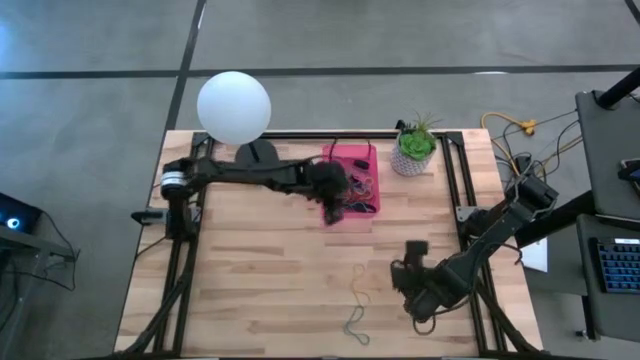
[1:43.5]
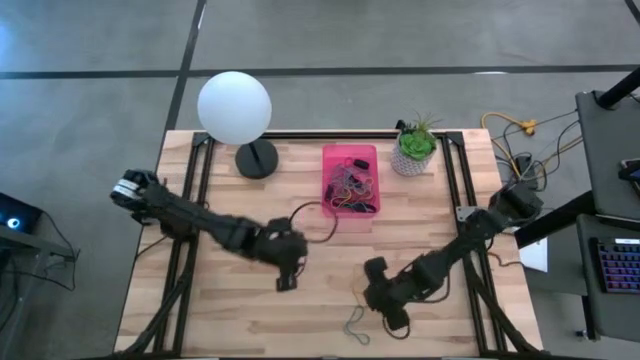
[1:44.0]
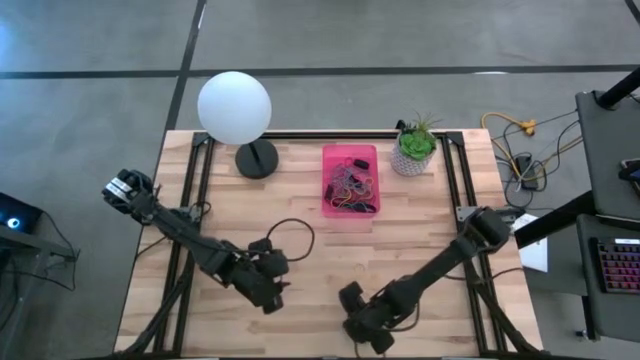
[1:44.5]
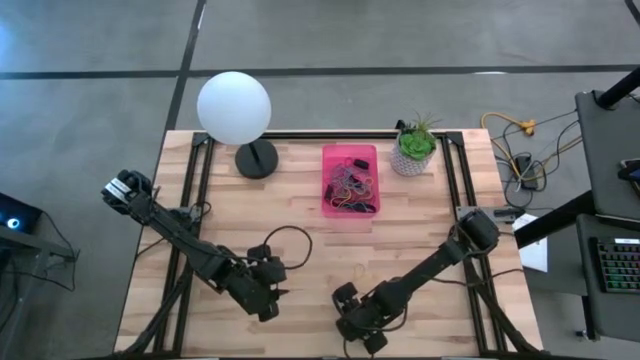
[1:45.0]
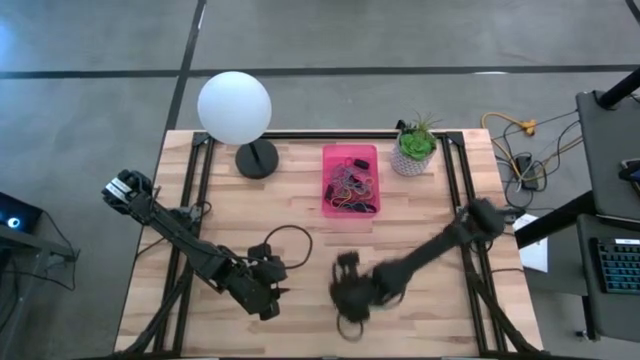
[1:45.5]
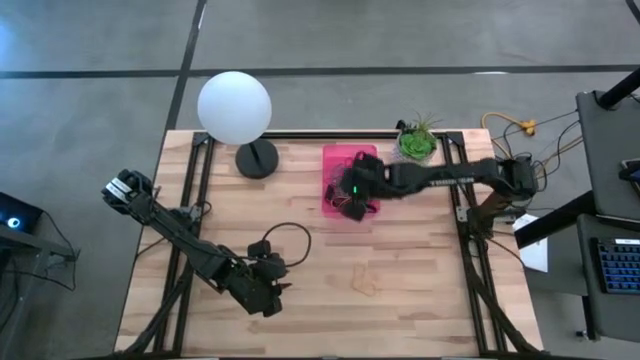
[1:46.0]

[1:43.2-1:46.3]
Task: Pick and place rubber bands into bin
Put the blue rubber band into the pink bin

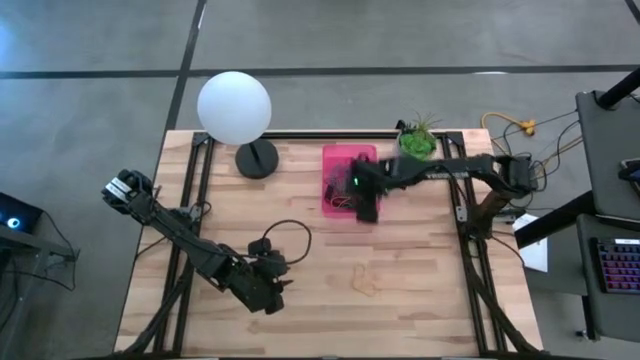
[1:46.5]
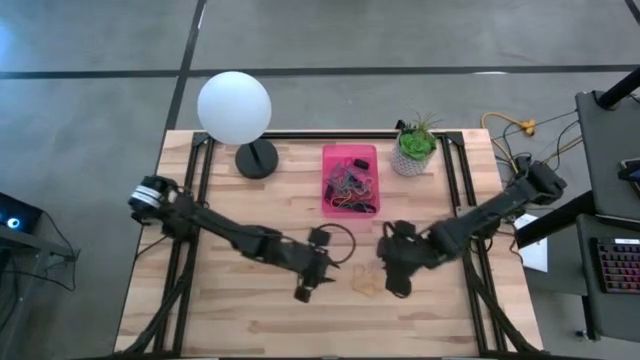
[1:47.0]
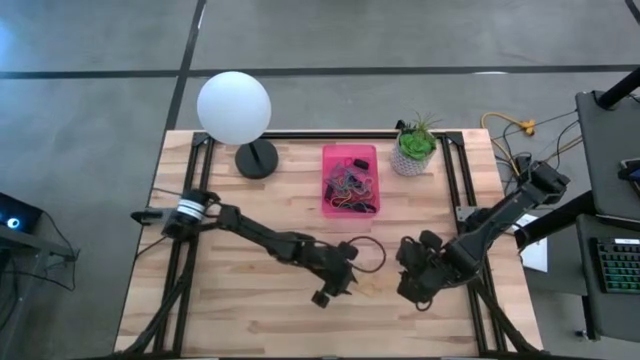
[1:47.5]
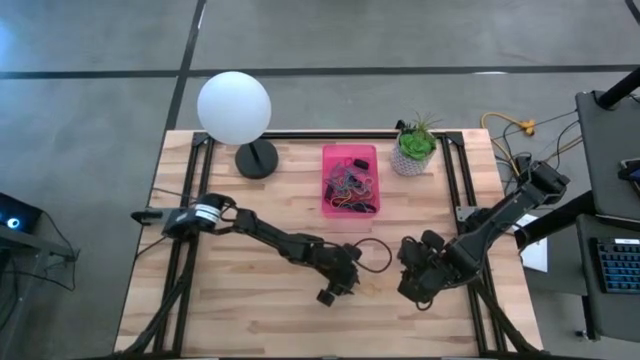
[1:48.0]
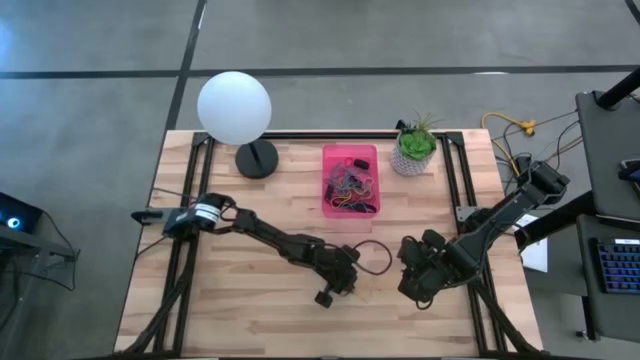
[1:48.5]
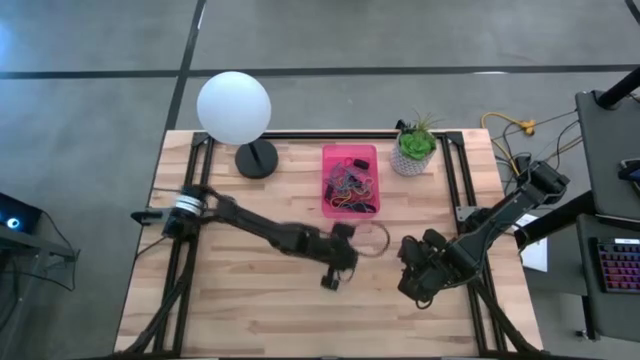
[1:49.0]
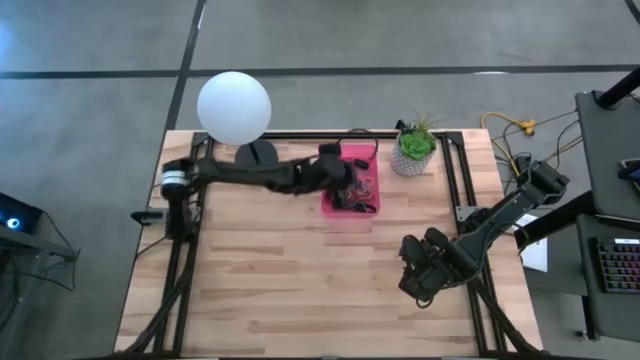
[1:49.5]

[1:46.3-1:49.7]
Put the yellow rubber band into the pink bin

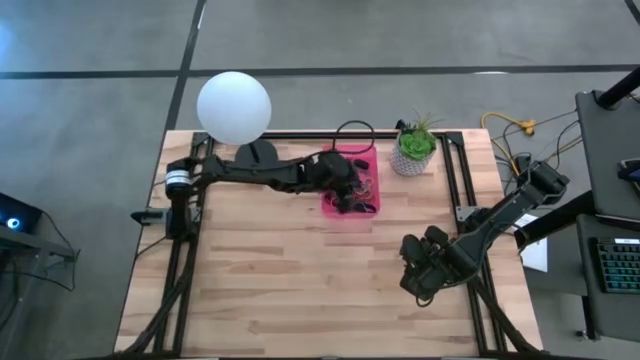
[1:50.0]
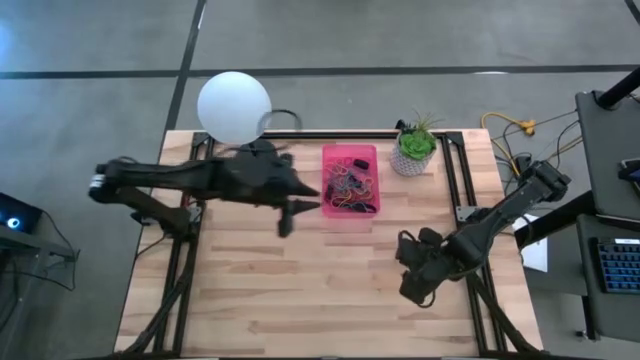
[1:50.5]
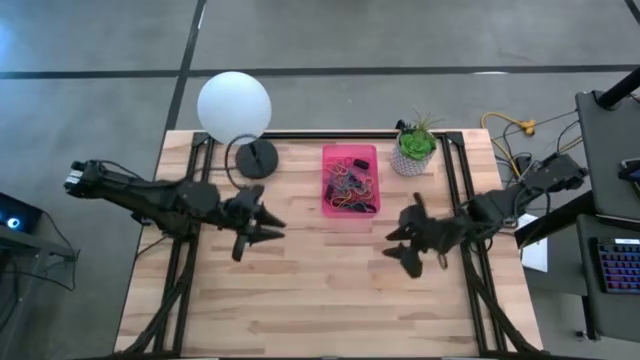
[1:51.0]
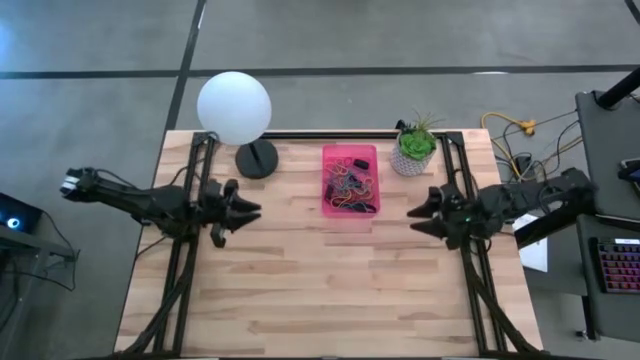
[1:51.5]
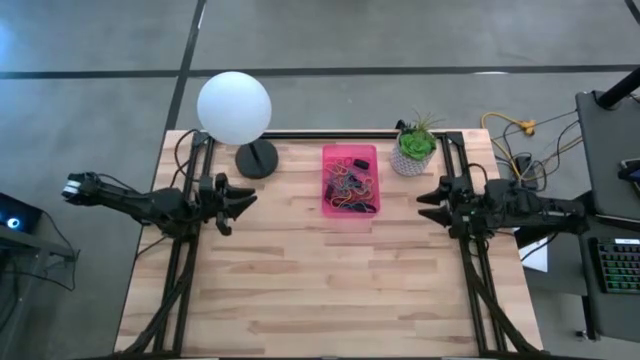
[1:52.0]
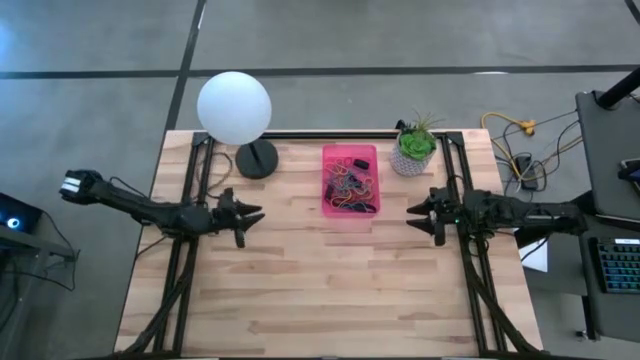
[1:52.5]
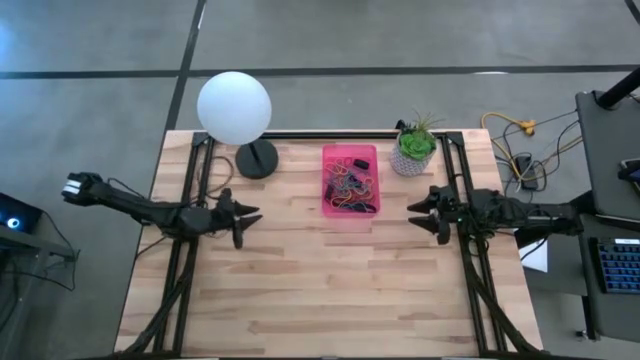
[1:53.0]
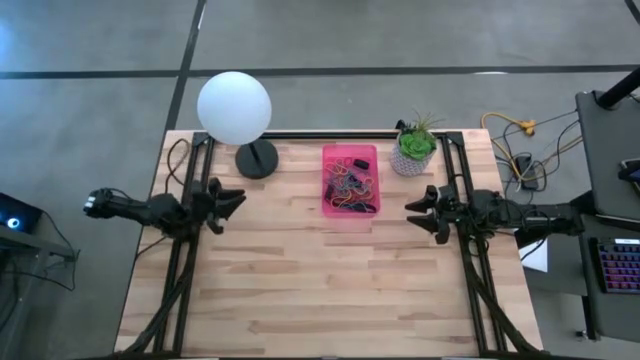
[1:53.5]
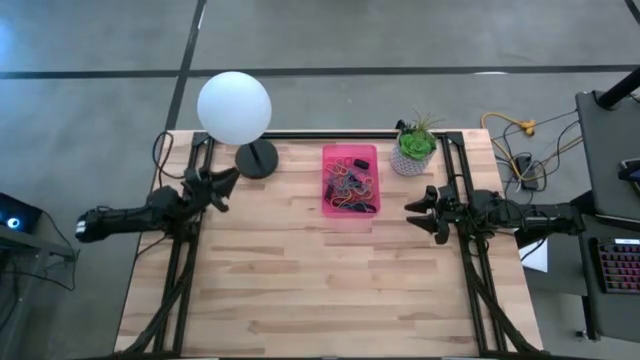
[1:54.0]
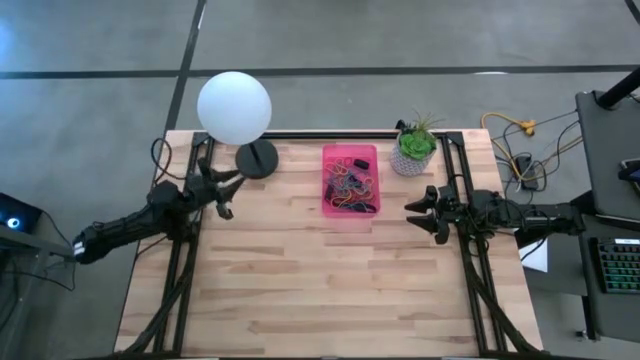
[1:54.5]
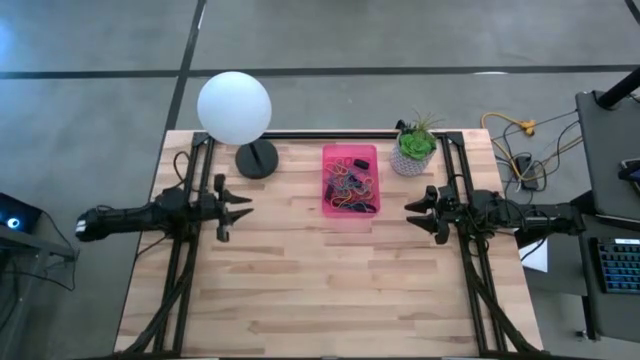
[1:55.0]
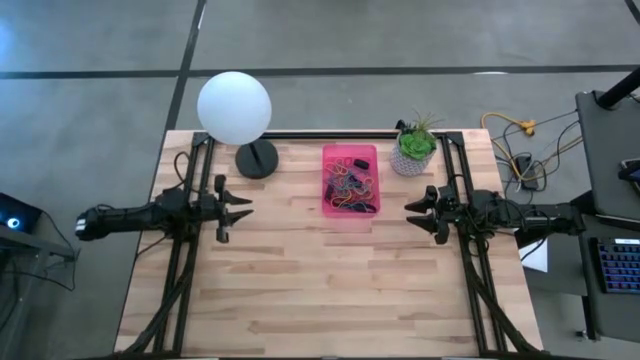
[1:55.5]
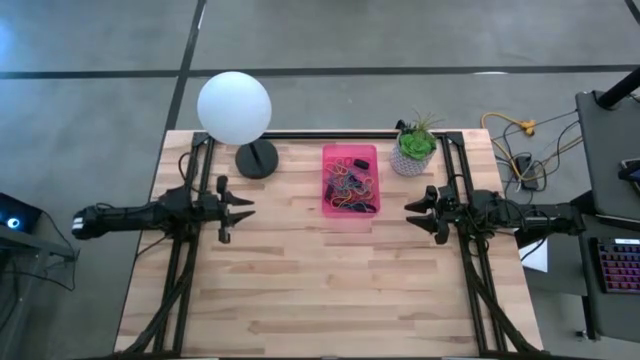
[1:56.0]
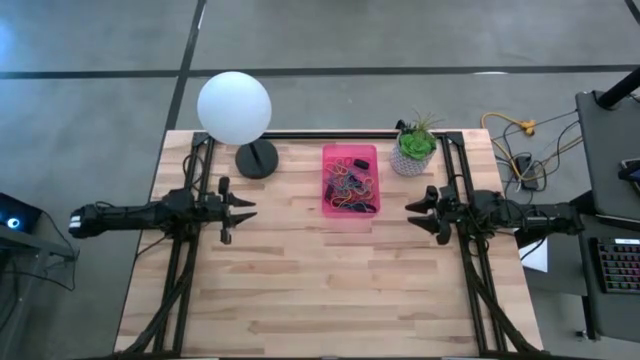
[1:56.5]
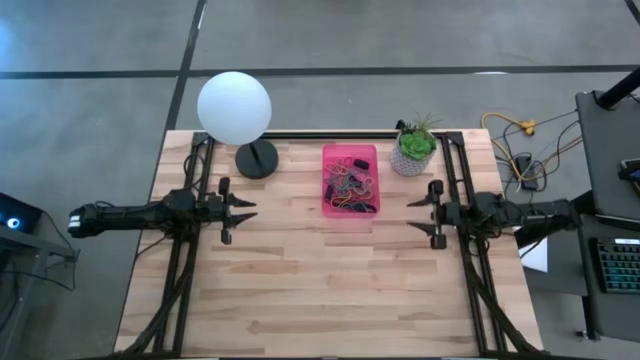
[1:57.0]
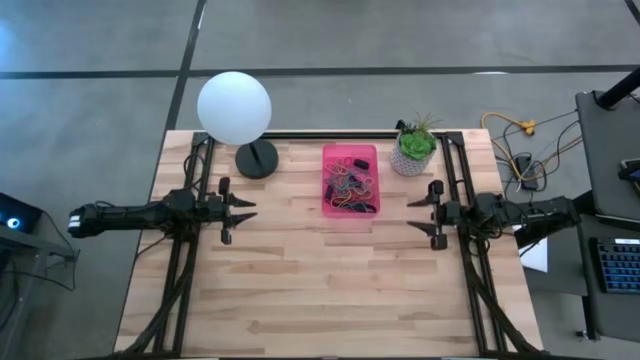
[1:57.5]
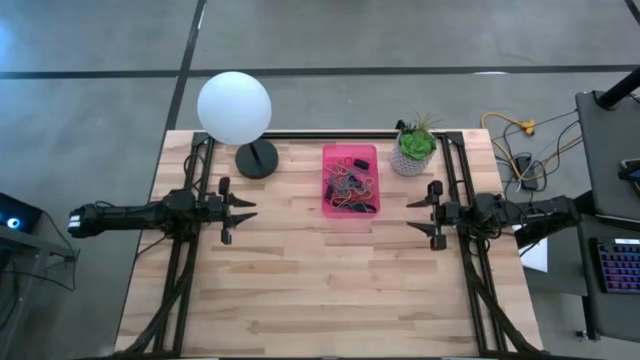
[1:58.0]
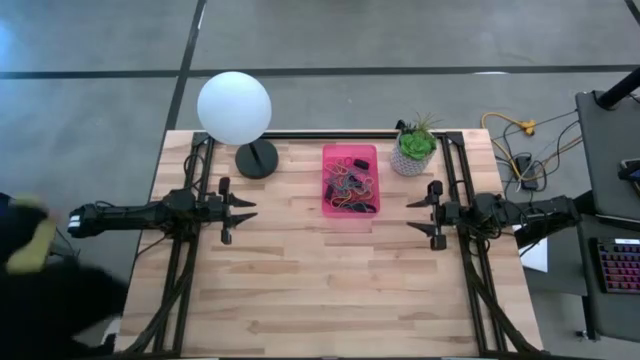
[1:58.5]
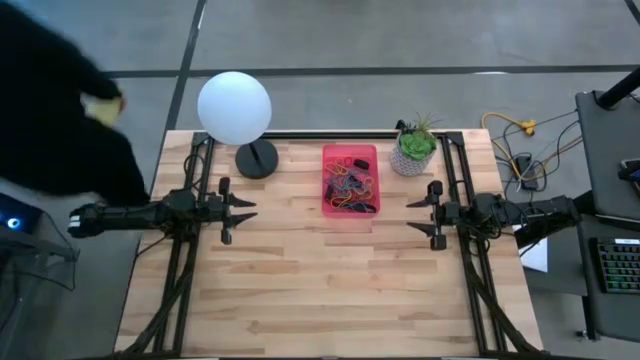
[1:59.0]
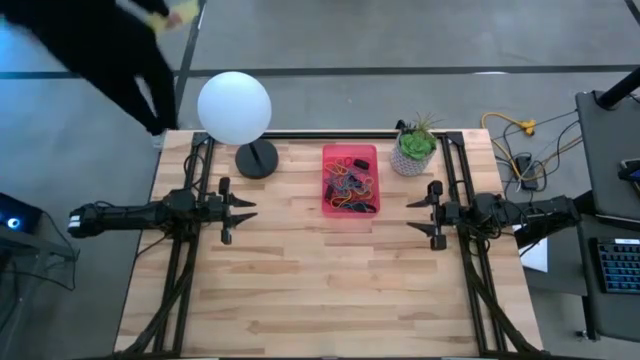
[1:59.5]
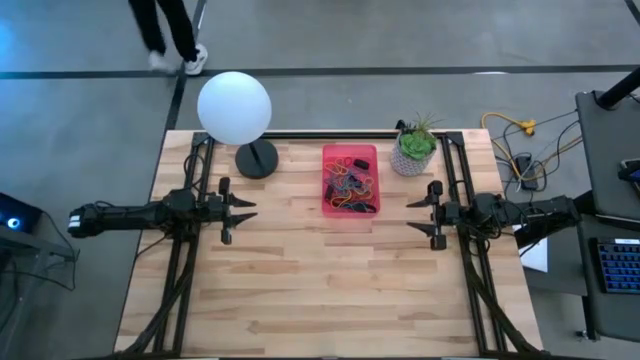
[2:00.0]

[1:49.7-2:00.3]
Return to Home Position

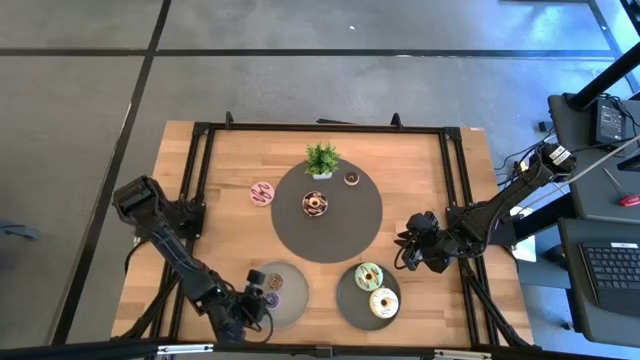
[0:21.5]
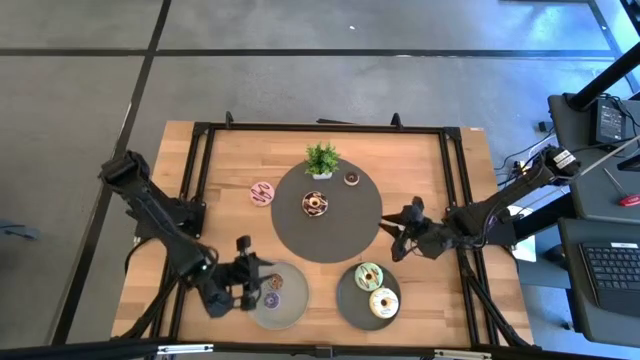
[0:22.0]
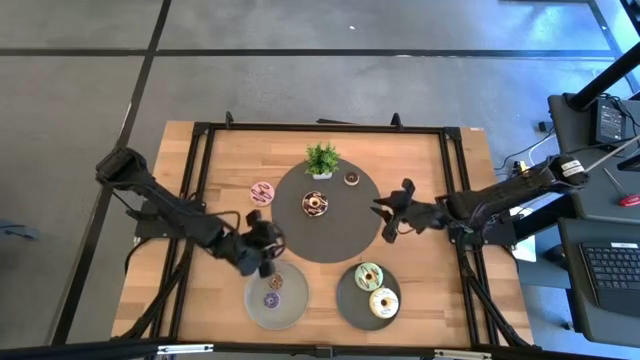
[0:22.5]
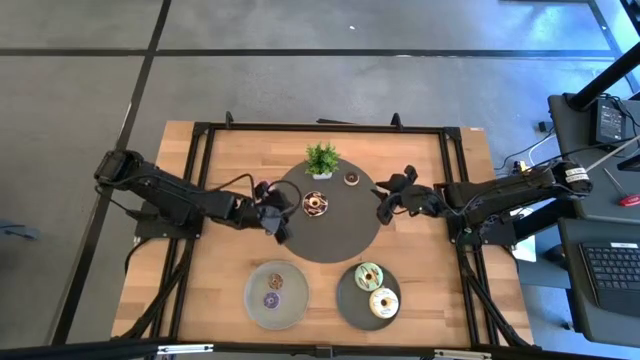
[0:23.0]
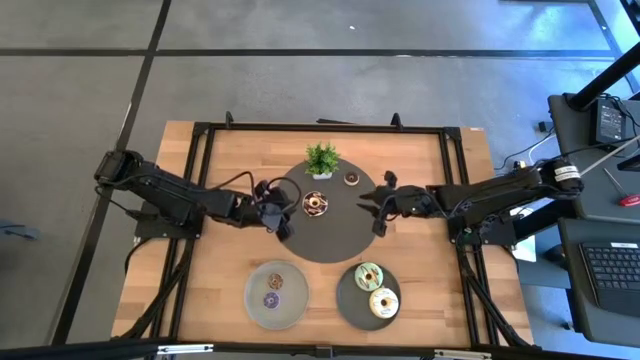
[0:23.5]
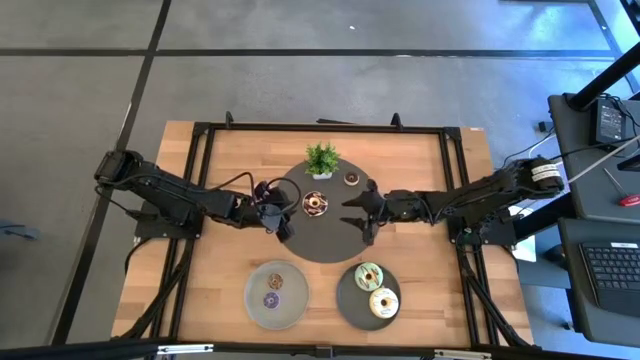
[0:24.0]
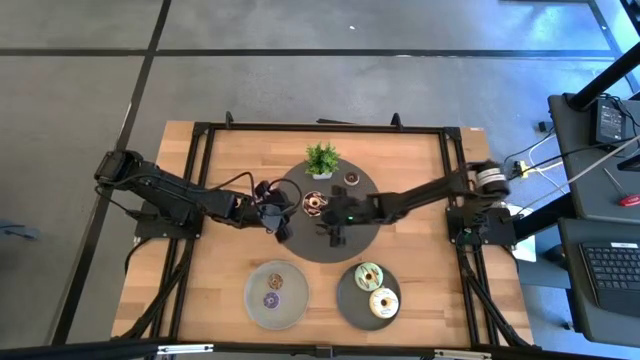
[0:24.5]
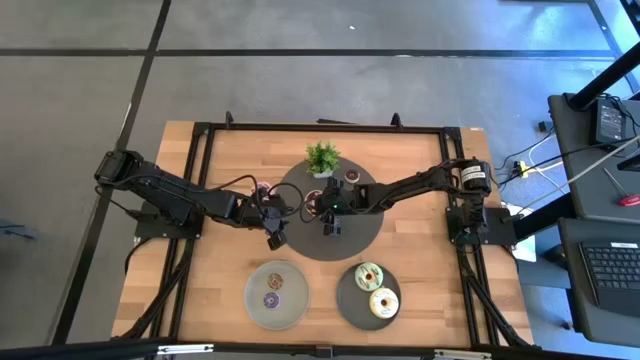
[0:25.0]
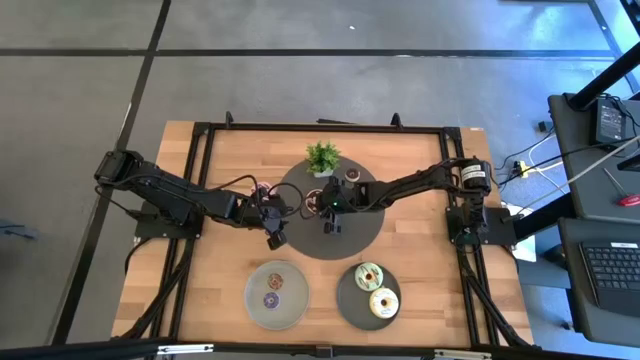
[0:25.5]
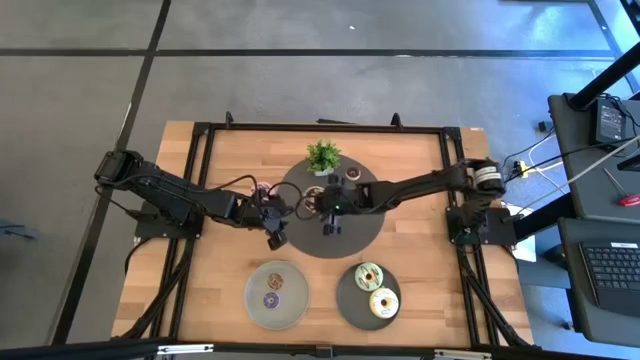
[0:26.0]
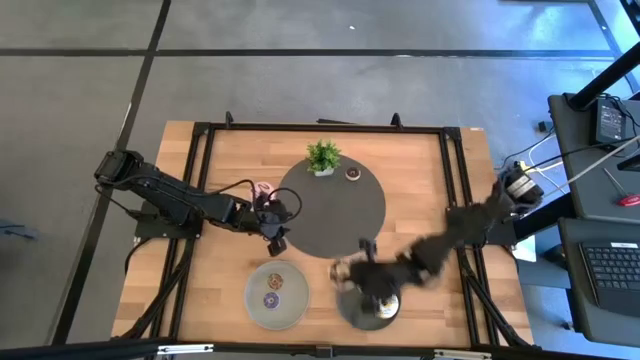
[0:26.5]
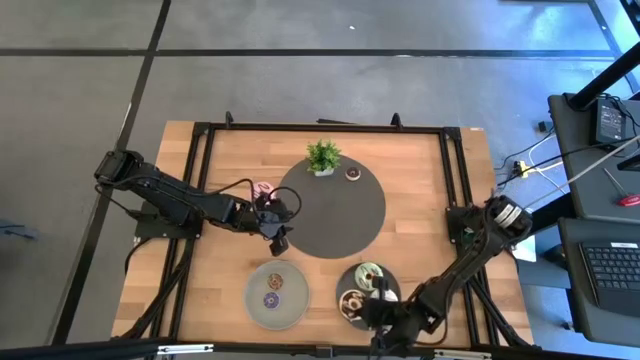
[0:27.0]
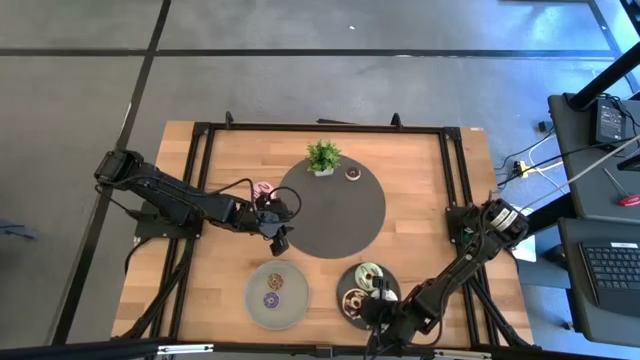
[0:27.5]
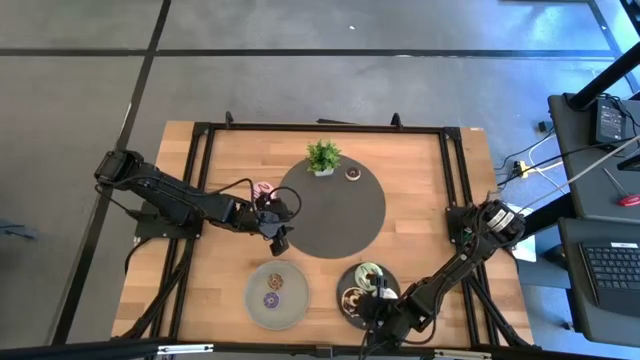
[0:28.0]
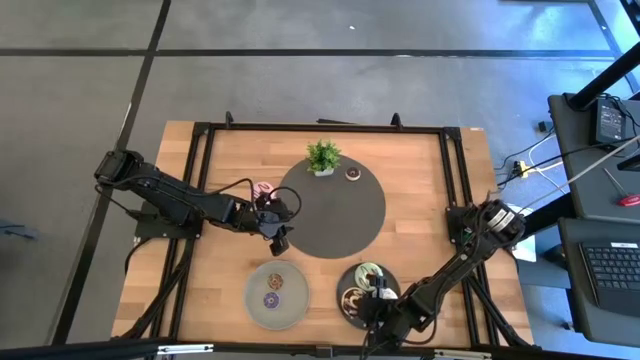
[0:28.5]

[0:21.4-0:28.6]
Task: Pick & Place donuts
Put the big dark brown donut on the black plate
